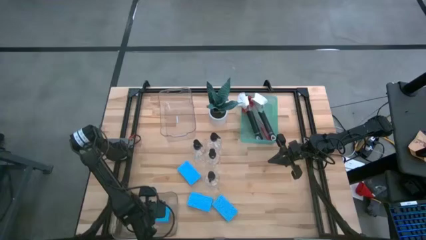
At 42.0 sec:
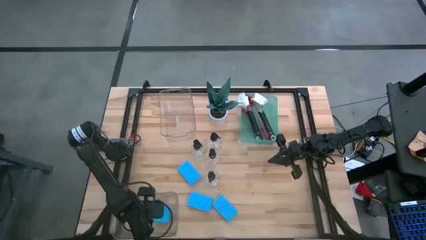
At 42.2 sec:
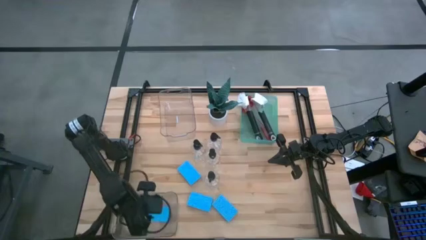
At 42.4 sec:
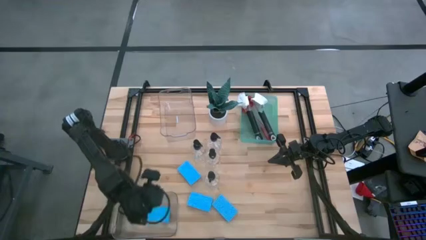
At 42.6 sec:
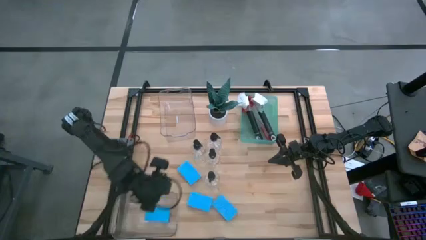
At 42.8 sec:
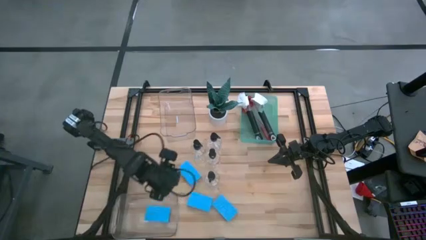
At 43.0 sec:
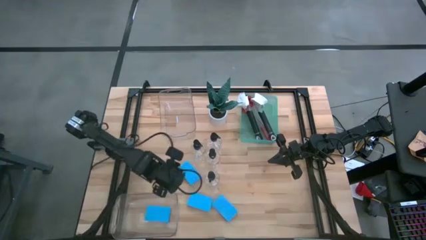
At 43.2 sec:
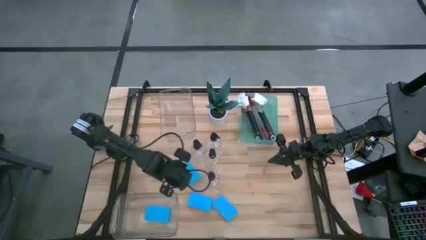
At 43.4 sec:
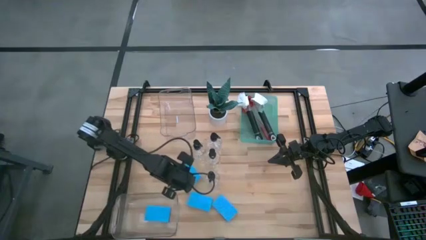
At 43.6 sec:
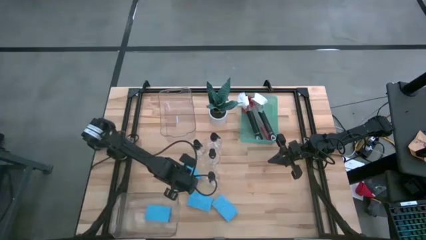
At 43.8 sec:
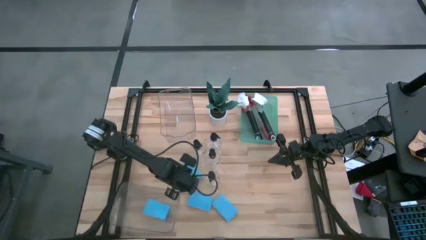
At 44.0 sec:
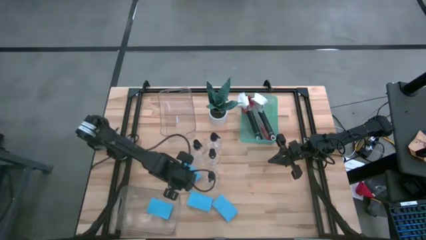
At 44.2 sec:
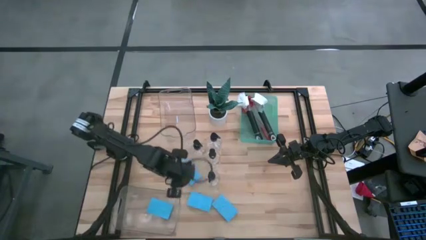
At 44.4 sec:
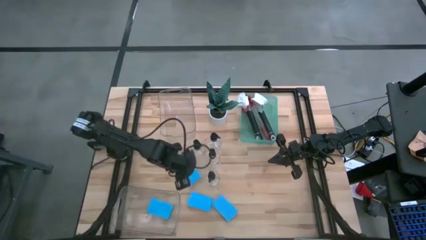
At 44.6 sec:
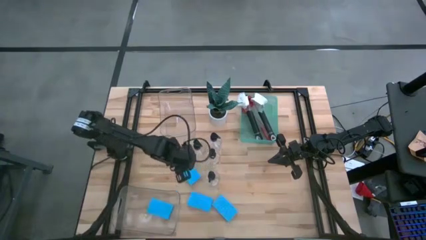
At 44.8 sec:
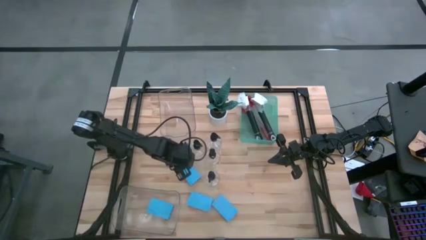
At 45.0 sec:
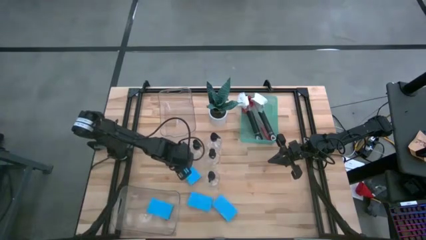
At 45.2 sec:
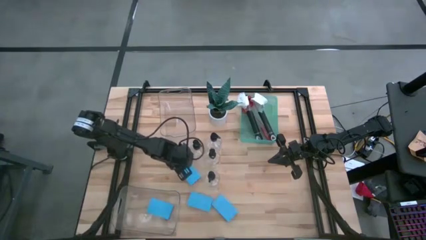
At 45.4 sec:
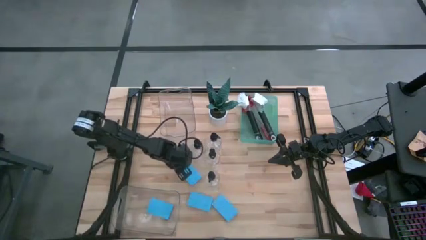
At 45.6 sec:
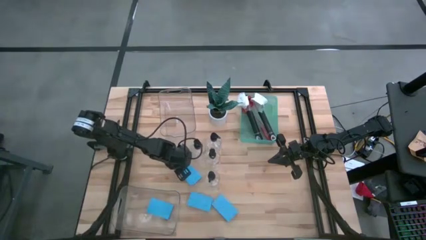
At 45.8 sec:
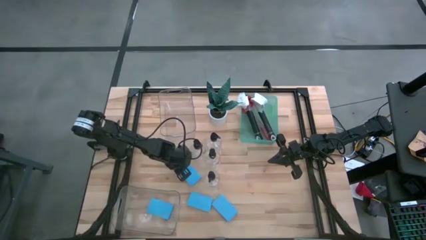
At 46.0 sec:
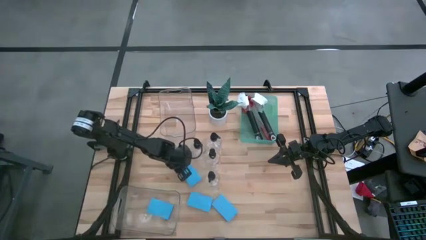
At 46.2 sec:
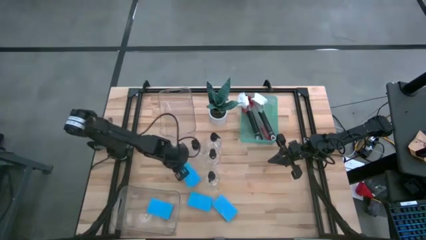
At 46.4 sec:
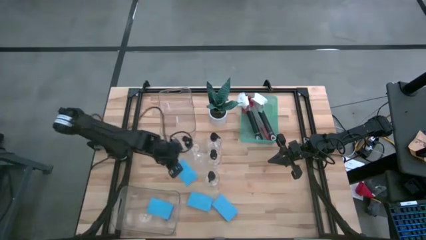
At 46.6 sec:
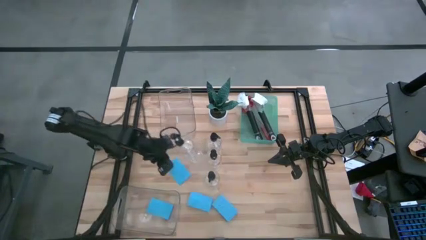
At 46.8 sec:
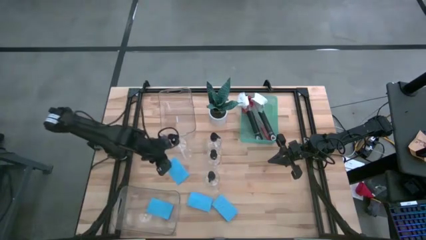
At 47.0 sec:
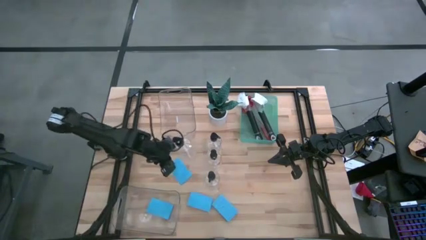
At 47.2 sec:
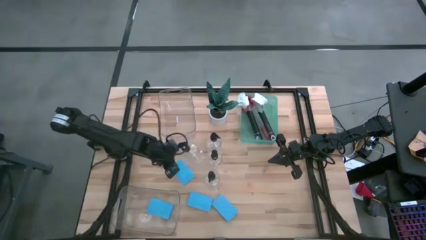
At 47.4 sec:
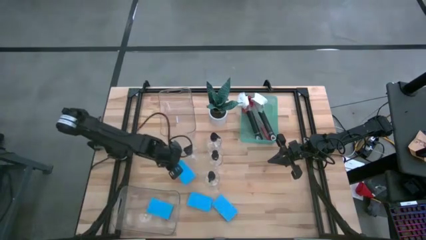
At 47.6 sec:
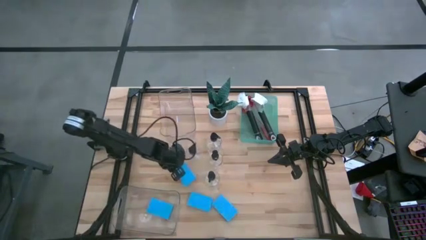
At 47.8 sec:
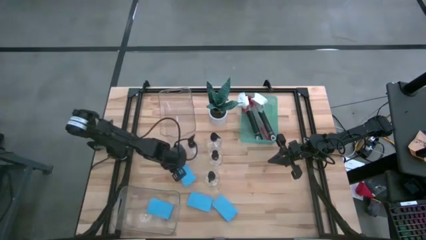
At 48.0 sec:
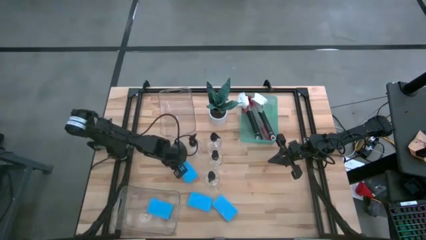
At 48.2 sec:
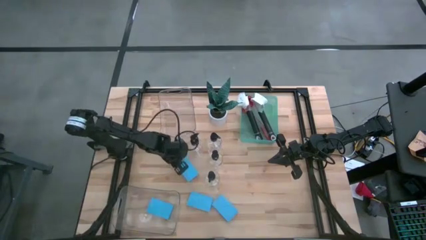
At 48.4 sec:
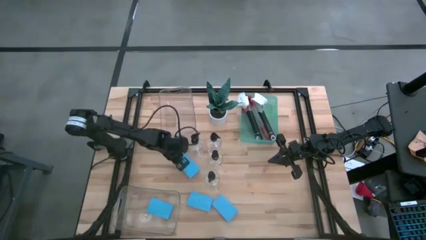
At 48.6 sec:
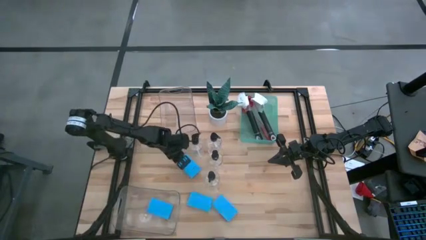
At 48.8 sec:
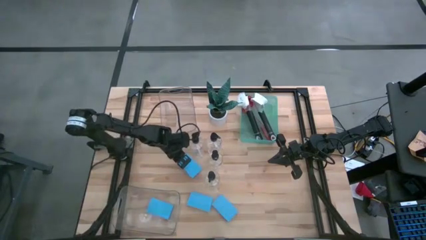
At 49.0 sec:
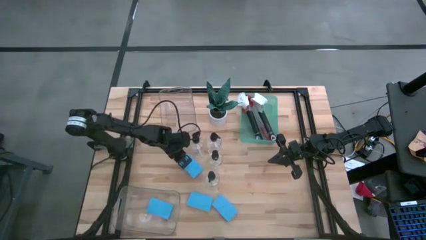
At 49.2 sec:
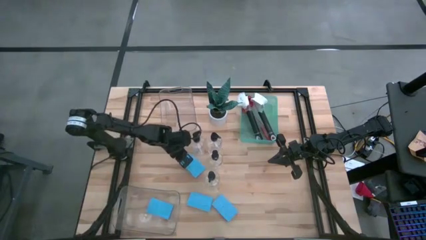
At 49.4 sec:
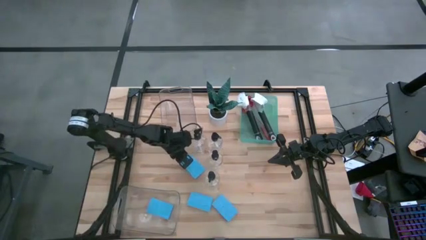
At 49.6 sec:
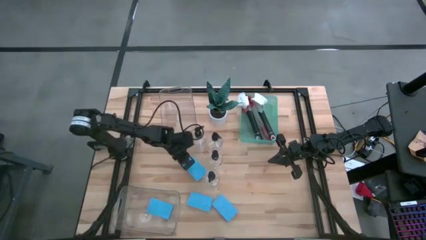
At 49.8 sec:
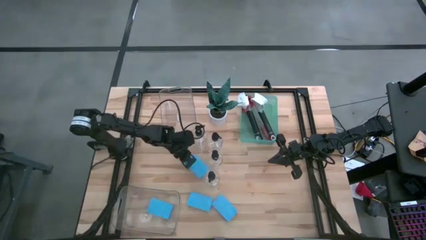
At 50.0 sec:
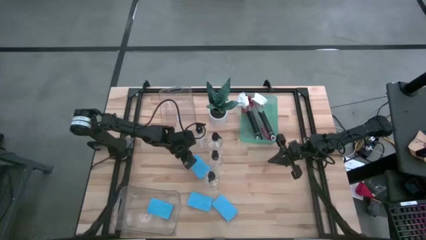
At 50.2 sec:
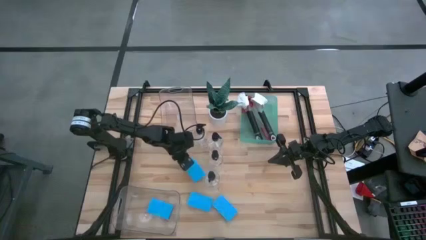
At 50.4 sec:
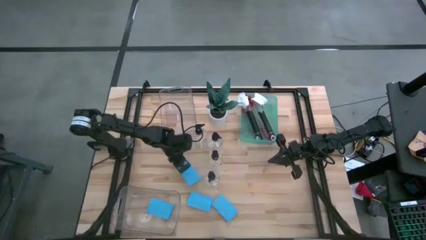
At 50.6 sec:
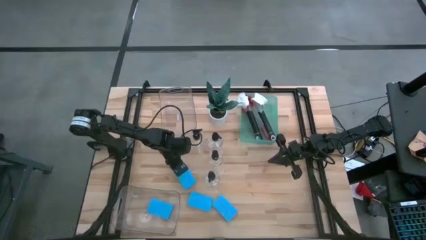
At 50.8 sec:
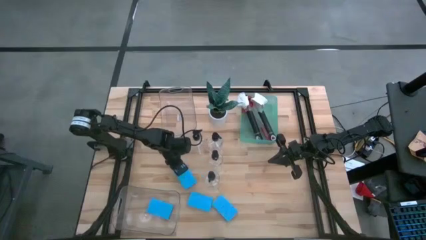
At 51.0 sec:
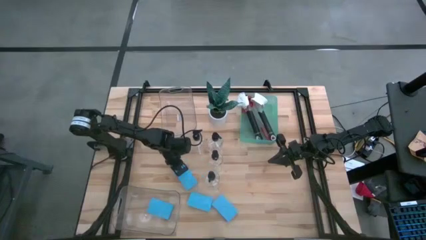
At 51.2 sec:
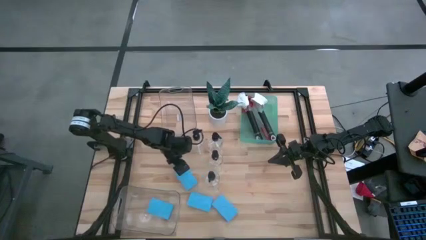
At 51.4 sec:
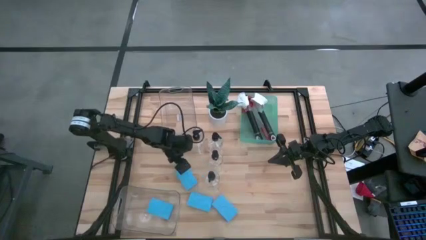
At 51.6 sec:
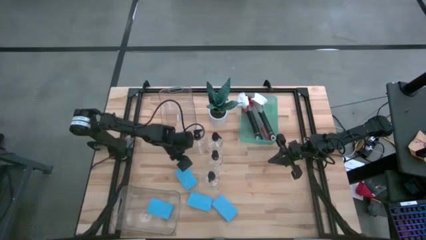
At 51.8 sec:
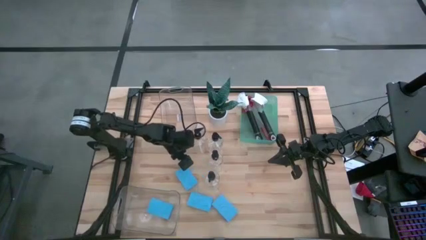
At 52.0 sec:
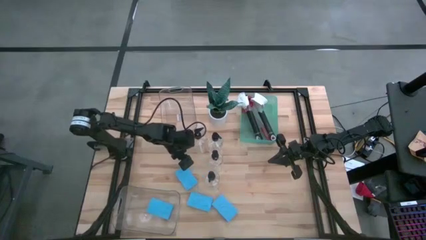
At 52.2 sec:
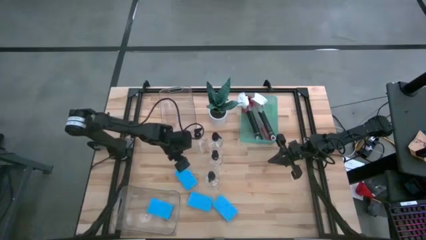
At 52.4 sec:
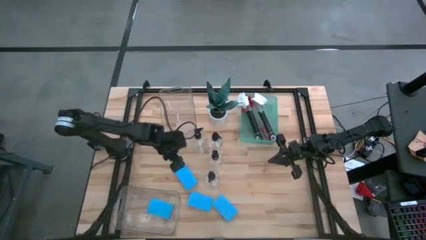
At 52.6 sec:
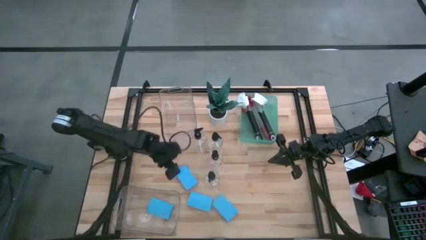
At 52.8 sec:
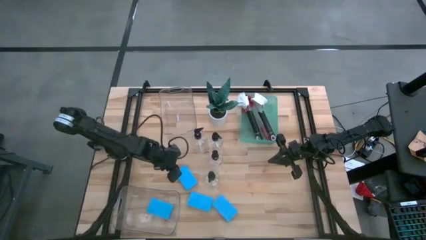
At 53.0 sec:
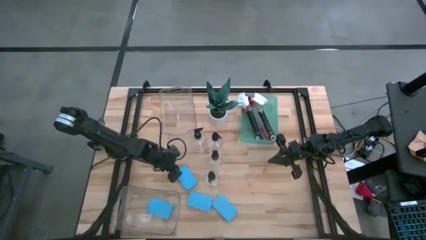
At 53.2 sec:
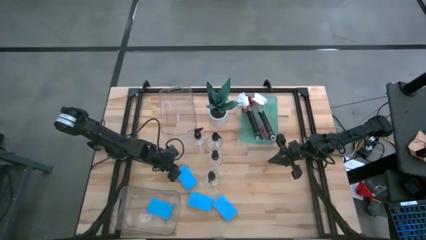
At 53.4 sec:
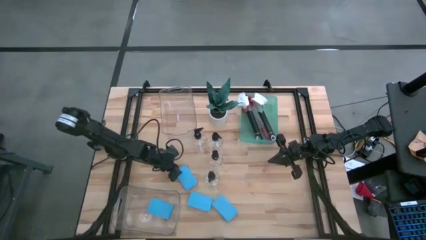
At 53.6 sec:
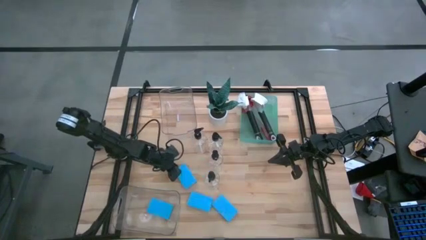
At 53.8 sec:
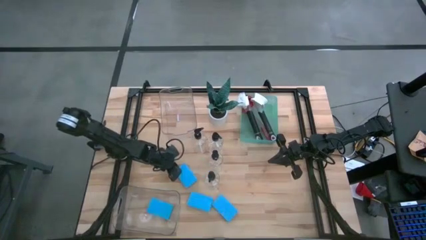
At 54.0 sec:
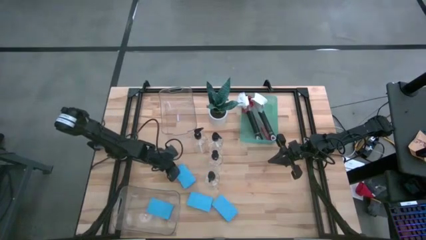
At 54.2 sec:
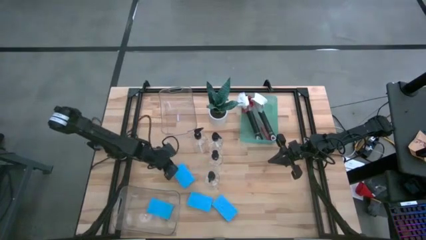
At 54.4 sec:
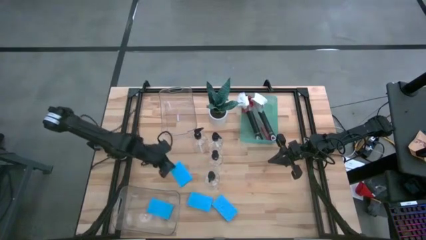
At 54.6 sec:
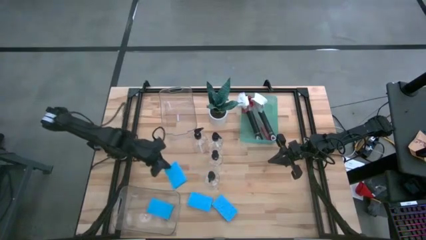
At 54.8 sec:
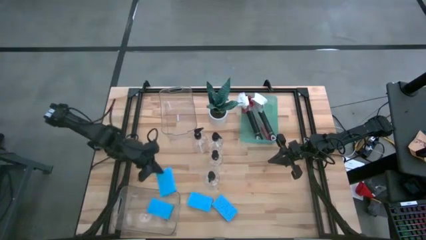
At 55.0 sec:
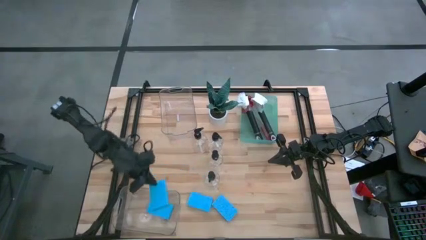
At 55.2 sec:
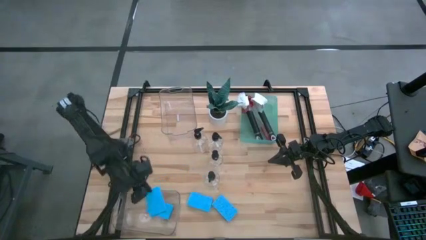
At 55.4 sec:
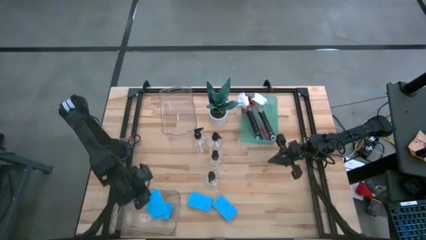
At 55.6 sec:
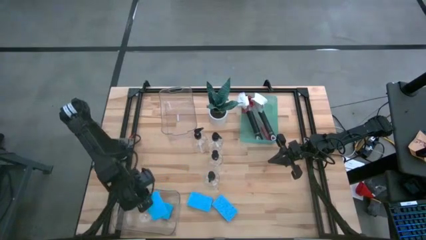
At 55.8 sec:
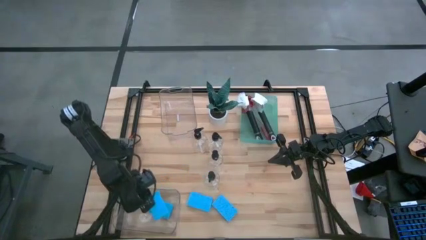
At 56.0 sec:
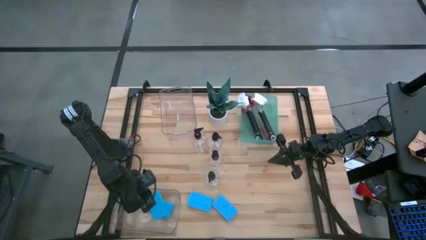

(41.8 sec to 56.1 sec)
Task: Pick & Place Kitchen Sink Supplies
Put the blue sponge into the bottom transparent bin

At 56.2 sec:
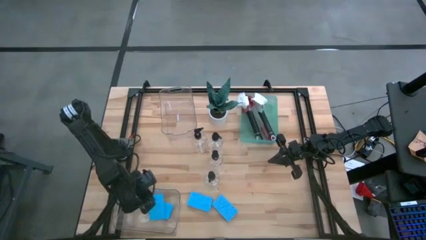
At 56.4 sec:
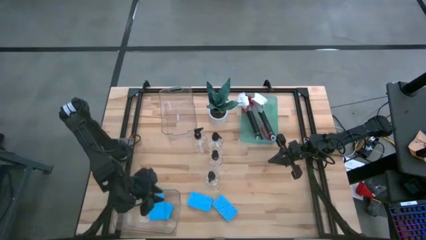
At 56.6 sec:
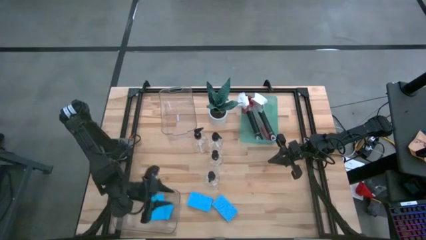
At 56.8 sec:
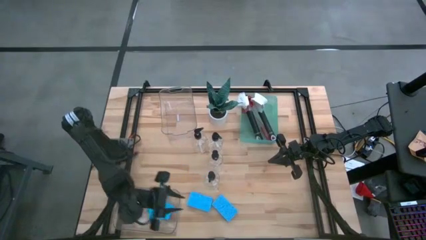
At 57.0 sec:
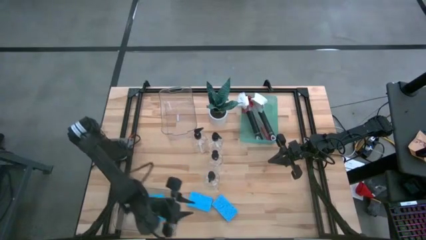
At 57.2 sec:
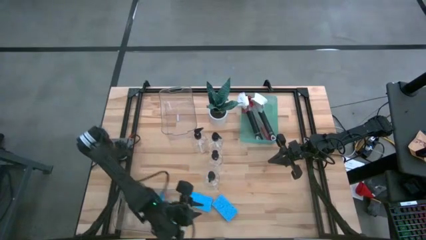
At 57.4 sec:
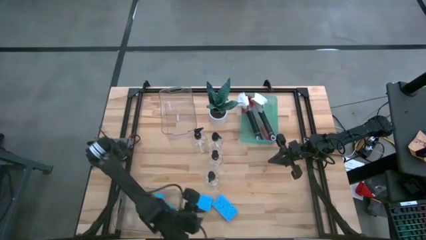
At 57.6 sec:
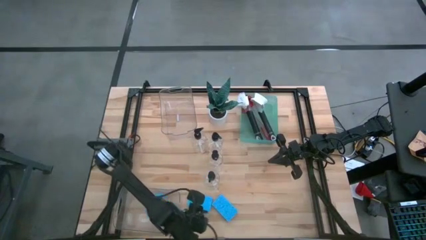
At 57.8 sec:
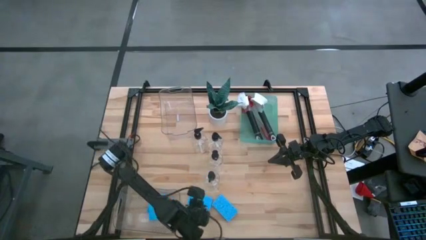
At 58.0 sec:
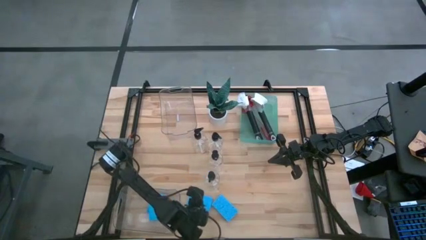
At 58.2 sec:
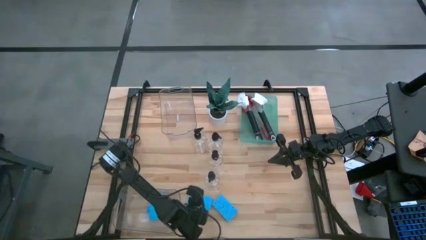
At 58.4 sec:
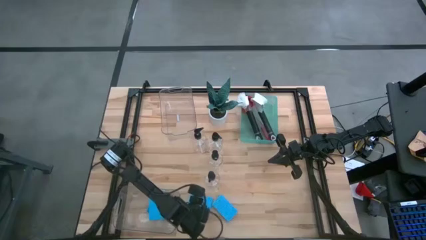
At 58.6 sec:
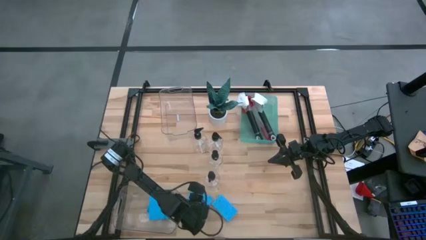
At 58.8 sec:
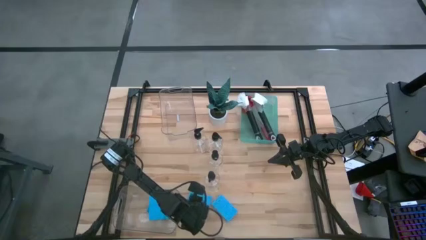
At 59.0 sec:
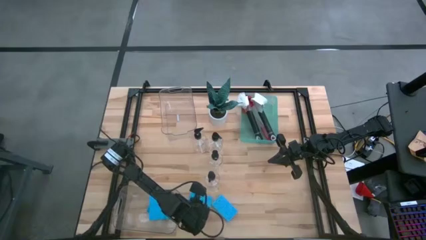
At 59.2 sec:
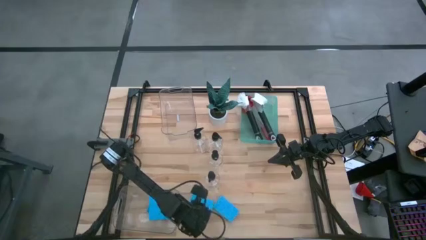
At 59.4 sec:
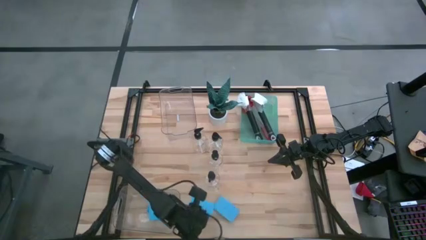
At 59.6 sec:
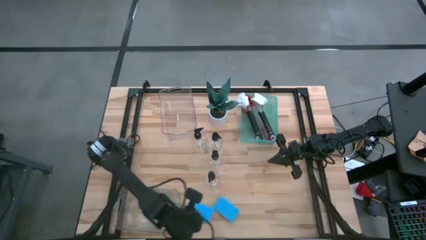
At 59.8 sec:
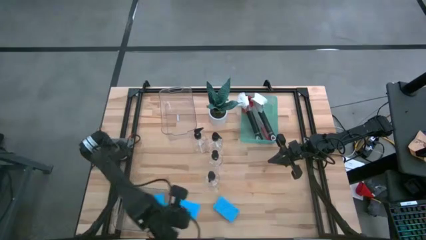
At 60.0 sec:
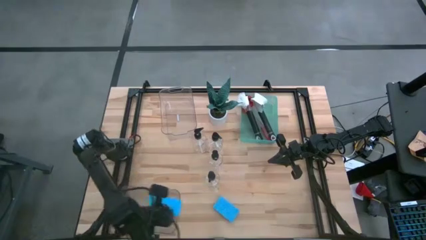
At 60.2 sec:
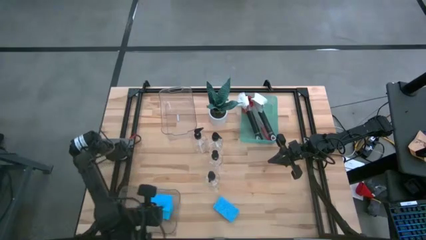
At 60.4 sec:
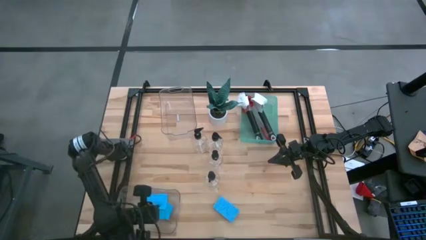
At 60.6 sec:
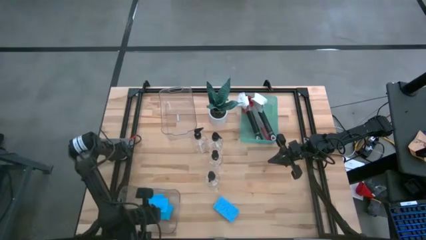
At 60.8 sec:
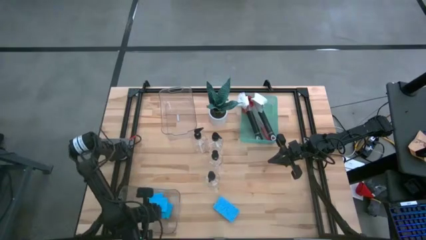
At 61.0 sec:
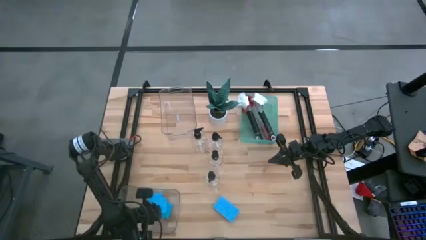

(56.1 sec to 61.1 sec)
Put the blue sponge into the bottom transparent bin
